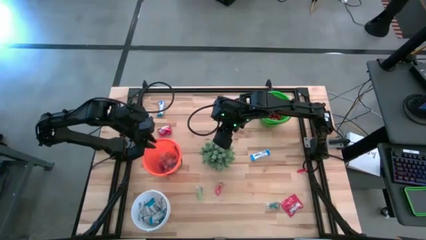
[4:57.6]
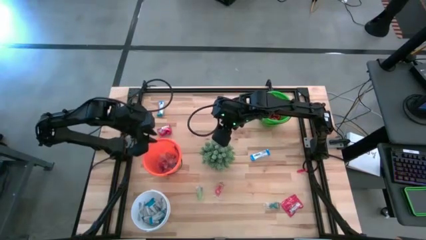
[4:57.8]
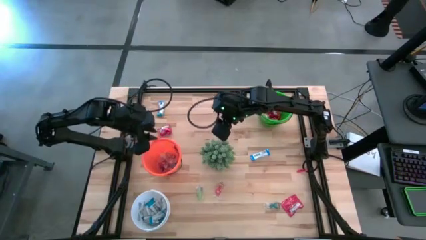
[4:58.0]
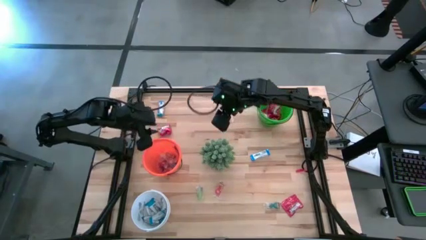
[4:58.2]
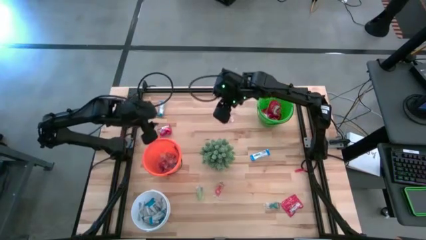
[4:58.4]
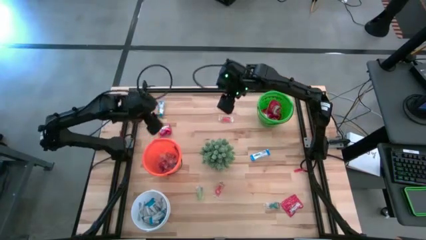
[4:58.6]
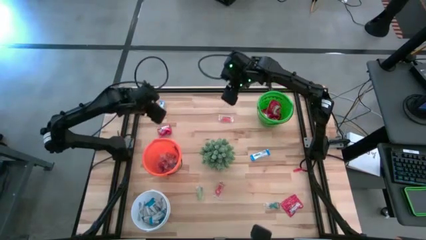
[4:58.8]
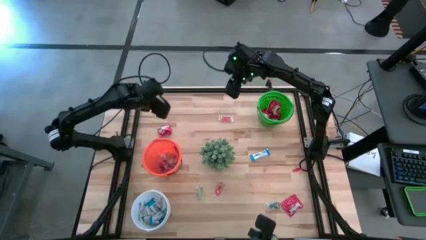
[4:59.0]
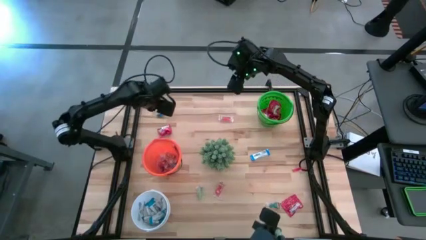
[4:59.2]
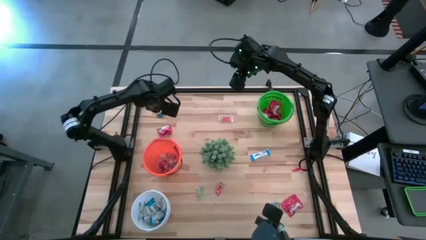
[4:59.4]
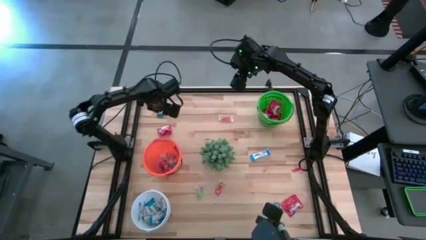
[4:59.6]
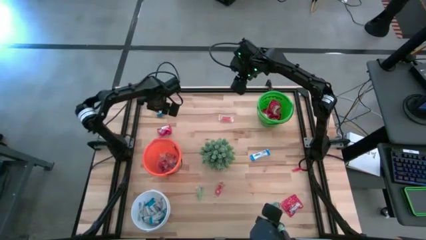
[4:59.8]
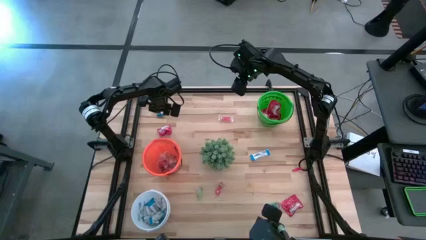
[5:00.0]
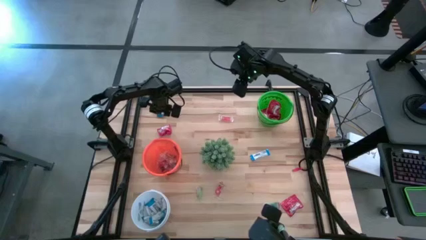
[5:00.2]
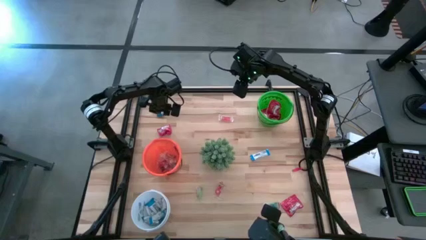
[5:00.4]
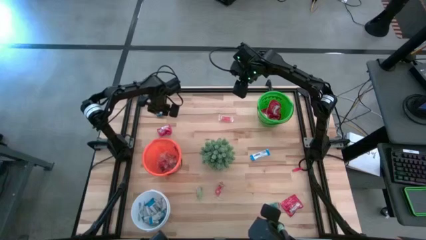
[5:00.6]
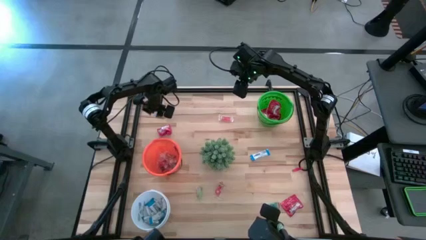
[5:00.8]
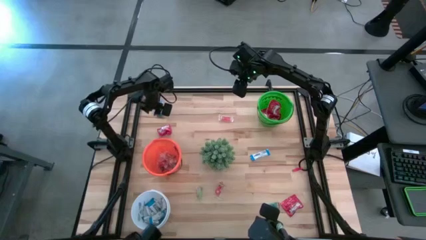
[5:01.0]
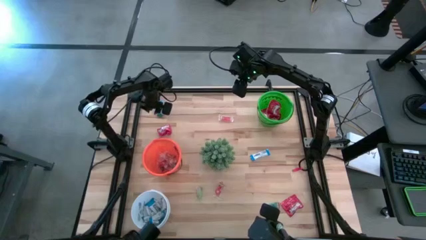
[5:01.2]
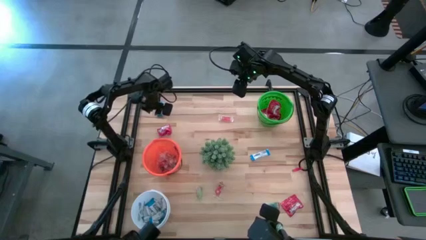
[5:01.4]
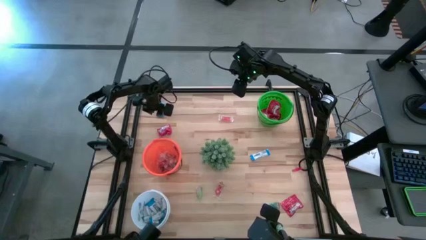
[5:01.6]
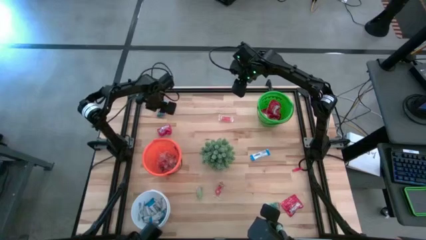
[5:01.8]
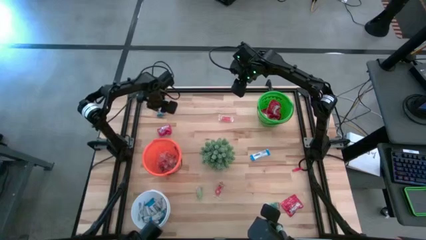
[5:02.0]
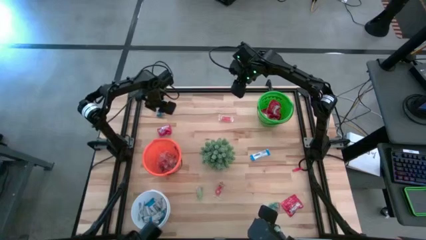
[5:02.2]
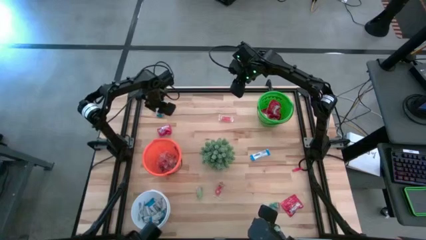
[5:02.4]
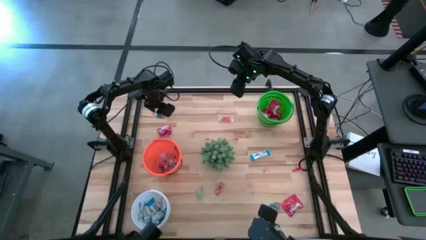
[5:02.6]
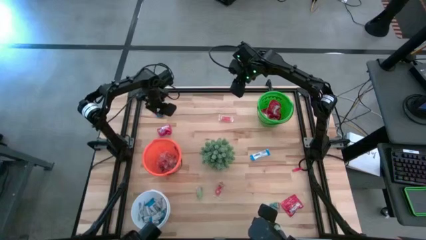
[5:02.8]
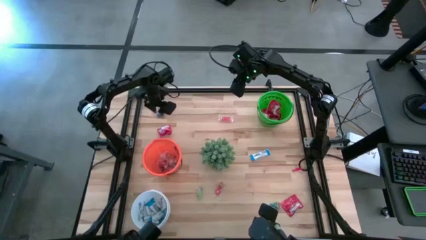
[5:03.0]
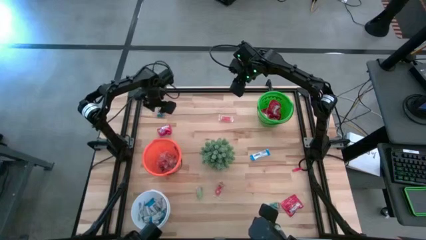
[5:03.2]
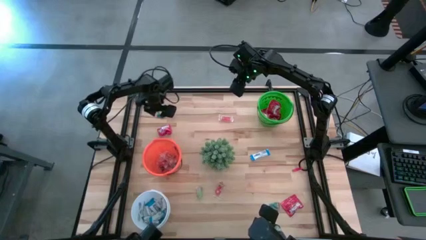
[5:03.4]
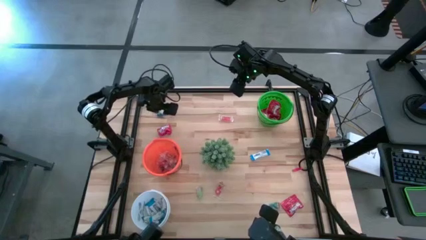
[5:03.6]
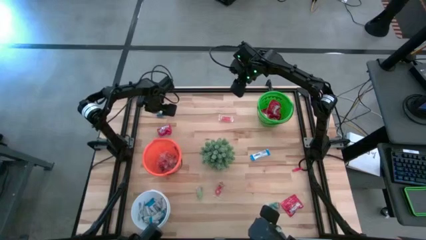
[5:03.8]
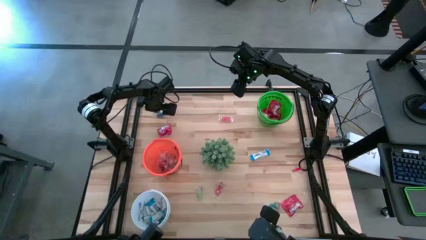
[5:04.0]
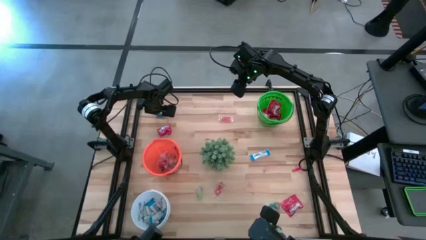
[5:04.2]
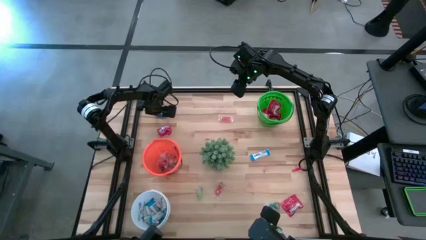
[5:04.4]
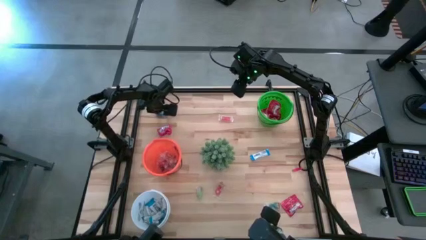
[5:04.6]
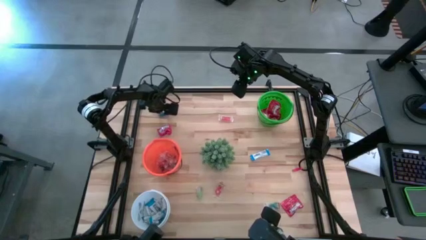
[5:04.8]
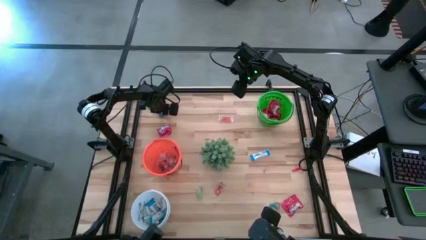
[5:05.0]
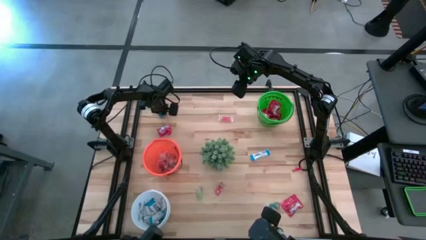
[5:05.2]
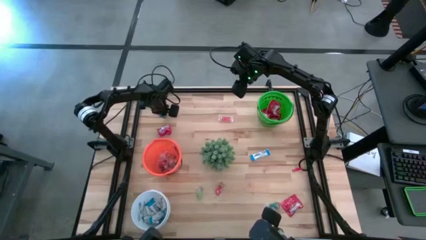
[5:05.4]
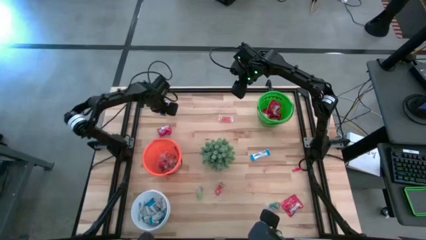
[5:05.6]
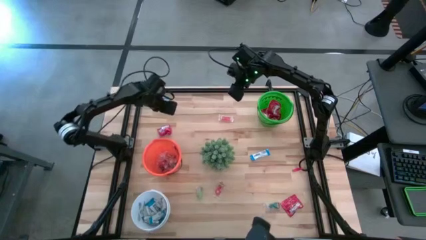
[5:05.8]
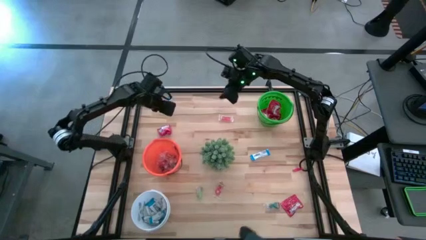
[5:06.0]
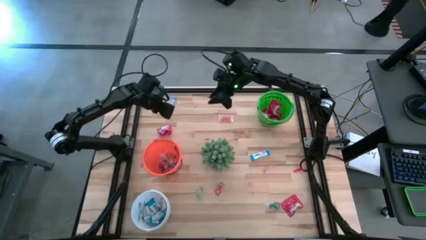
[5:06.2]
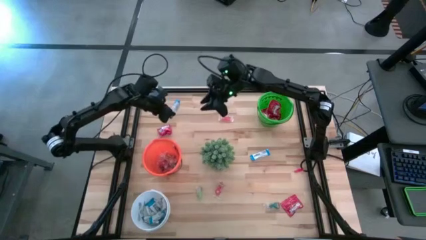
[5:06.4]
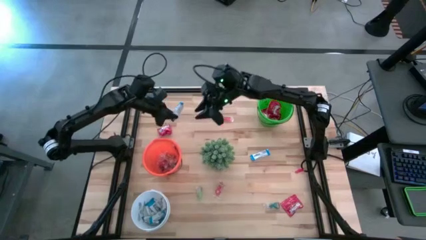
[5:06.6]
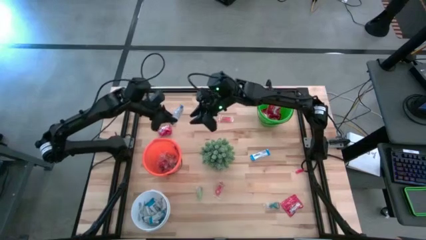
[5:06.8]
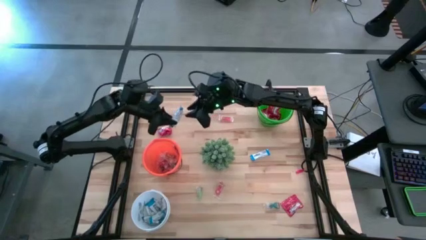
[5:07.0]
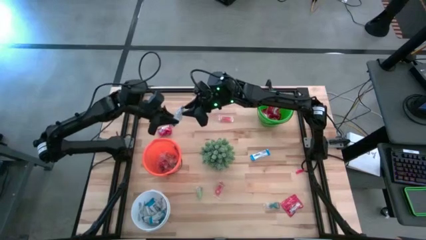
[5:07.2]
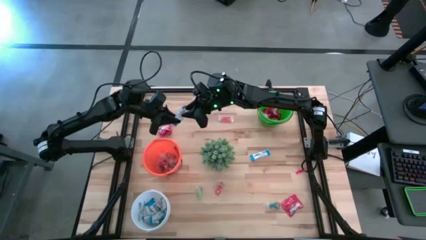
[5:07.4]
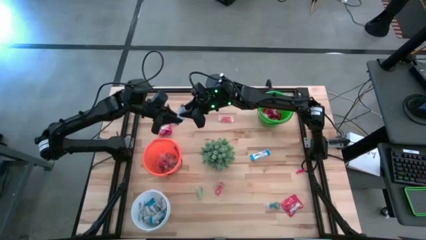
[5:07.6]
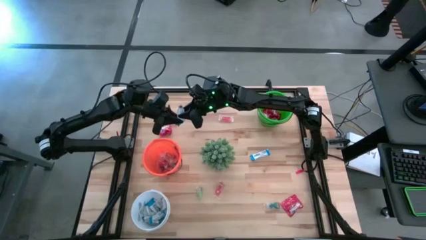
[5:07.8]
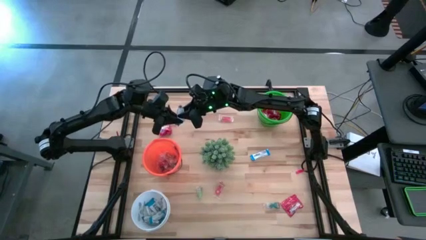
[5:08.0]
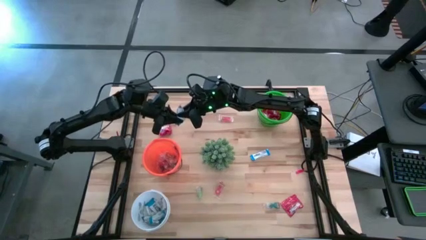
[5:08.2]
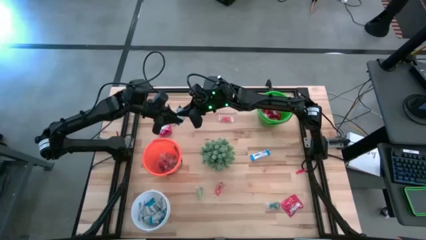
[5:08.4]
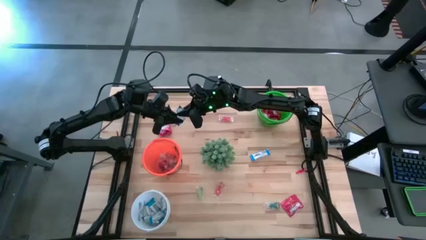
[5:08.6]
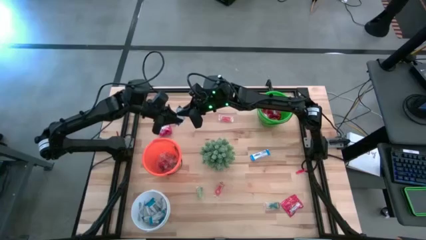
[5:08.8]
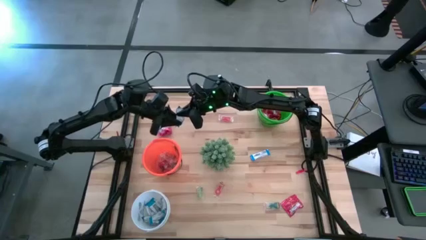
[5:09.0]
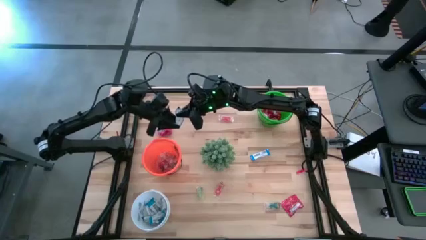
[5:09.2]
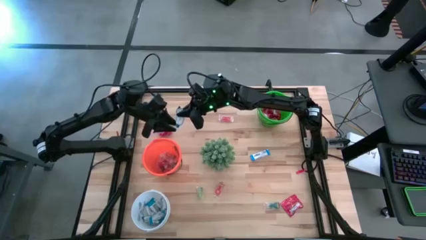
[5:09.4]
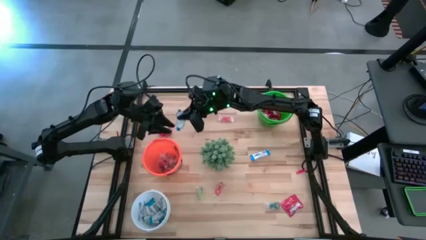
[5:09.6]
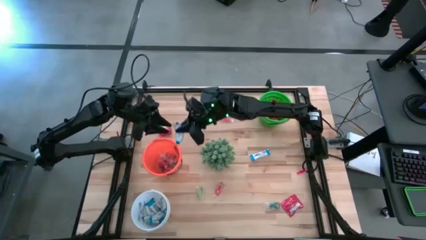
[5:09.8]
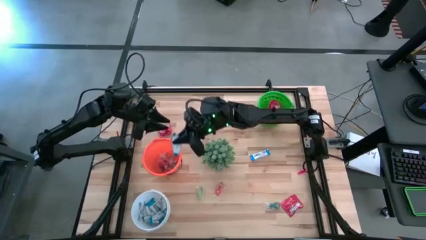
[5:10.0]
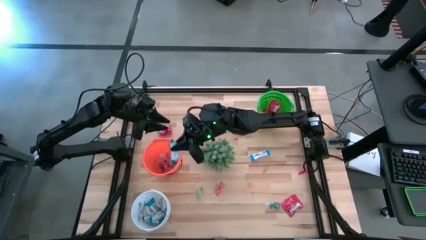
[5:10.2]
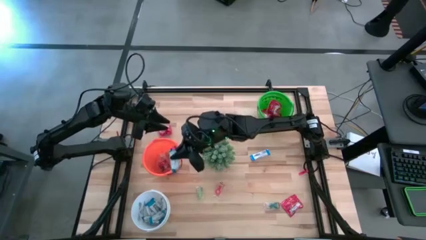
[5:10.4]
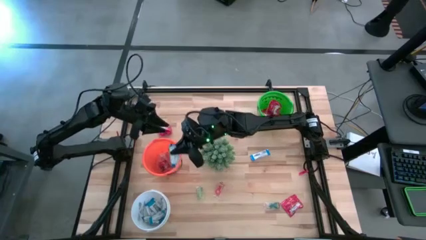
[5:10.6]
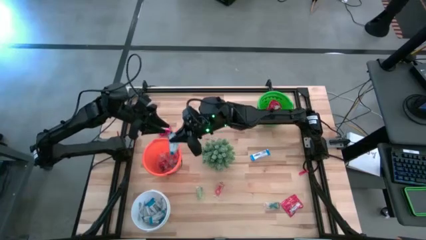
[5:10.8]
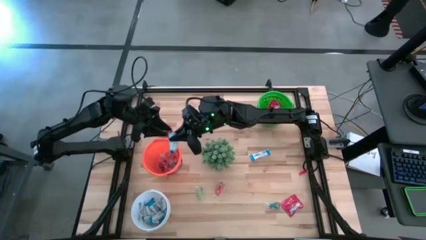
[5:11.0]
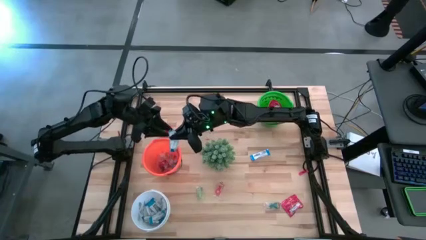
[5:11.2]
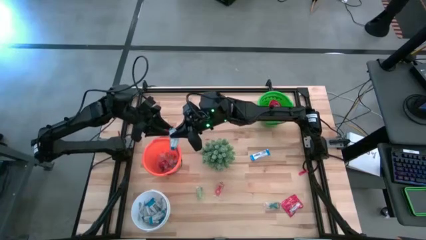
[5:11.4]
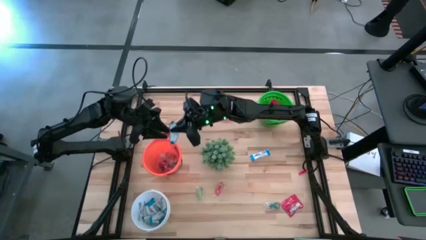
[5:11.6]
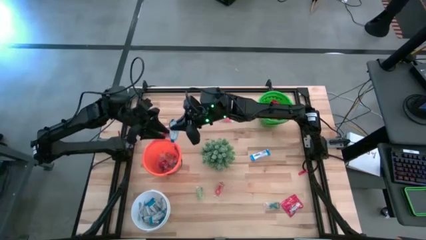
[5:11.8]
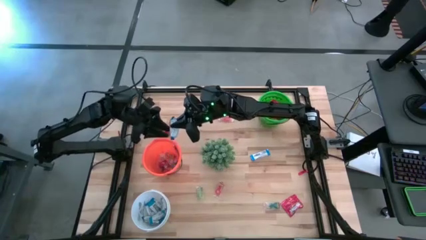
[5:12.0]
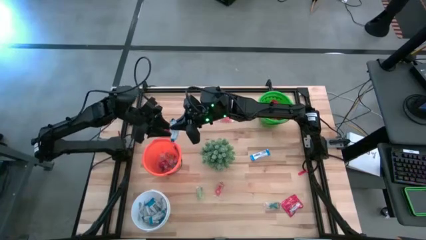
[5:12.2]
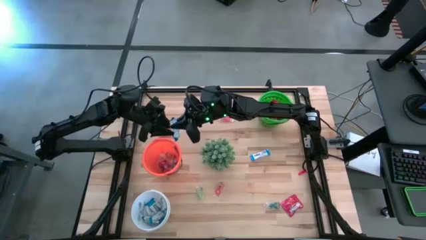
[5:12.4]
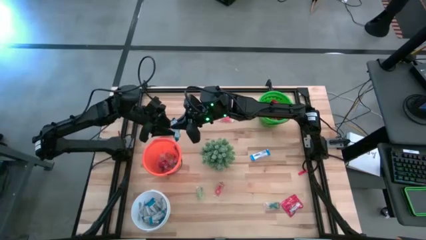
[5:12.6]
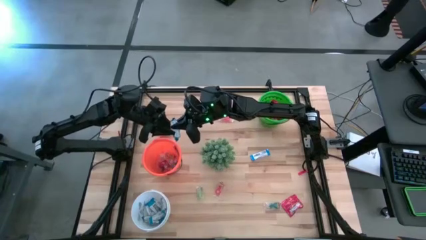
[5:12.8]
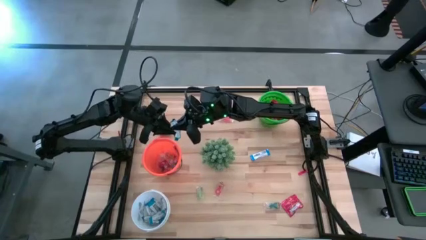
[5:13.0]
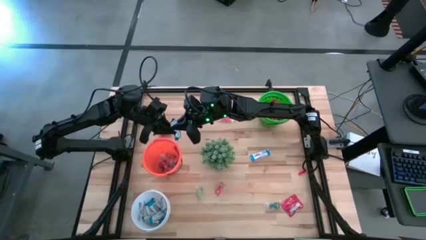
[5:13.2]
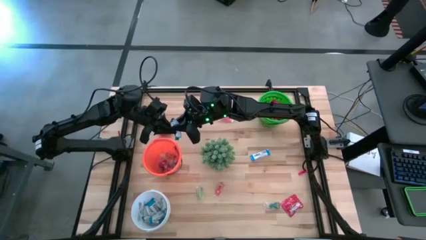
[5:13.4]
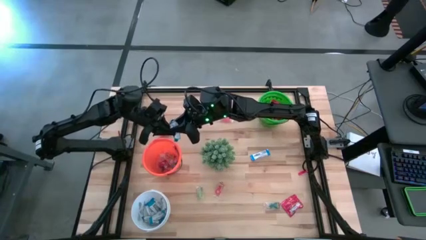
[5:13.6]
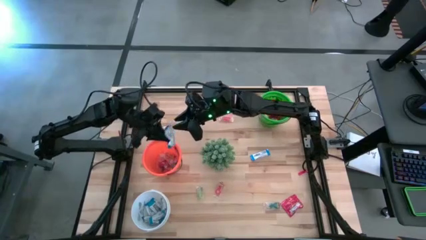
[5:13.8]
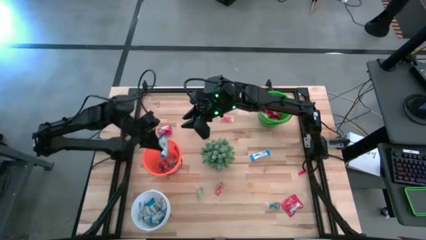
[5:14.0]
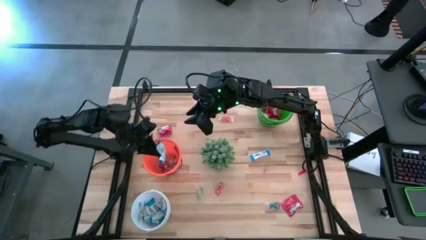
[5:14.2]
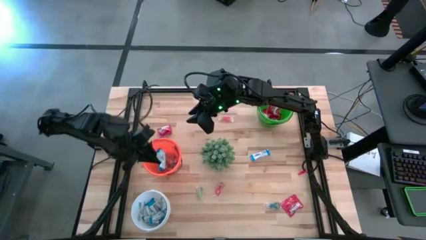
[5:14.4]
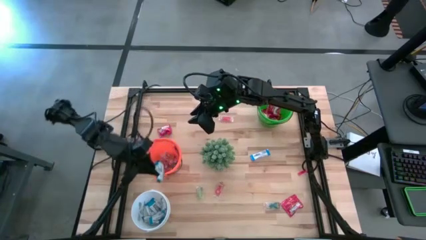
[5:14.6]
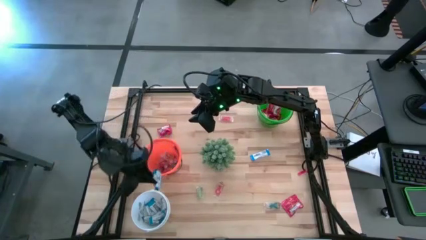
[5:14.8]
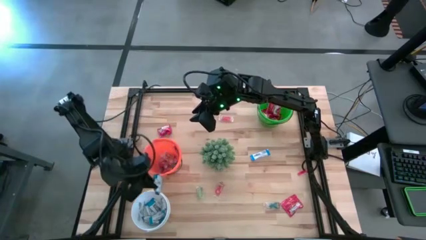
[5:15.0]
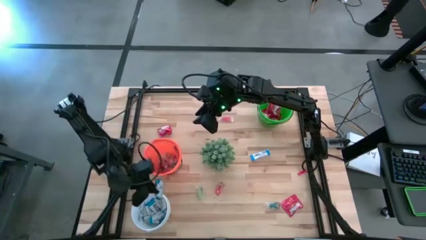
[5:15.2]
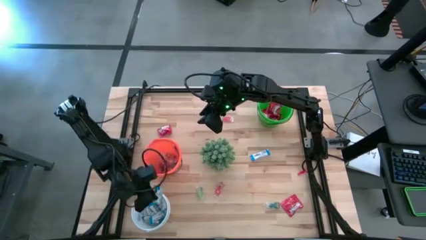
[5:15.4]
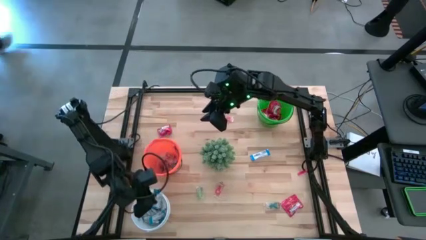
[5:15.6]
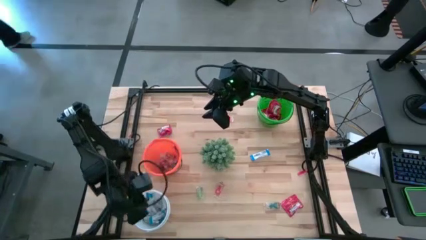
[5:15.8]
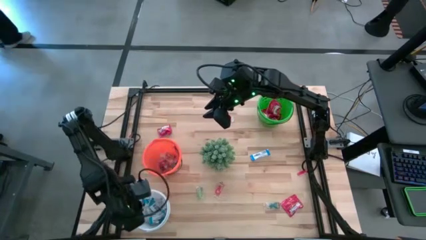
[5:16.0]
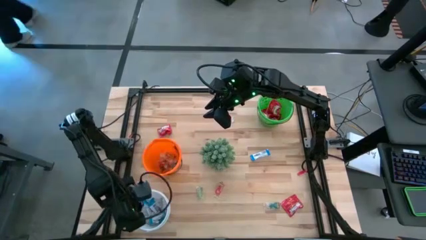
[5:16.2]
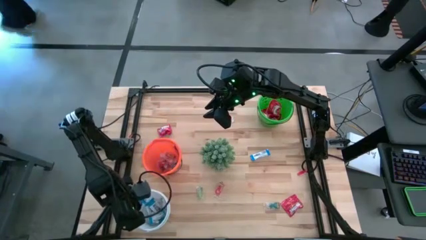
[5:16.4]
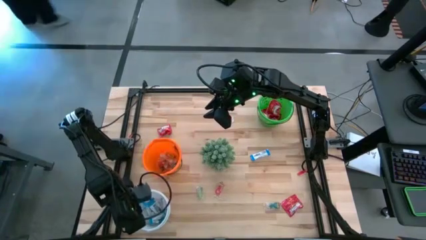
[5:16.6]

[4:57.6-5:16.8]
Task: Sort candy
Put the white chocolate into the white bucket
